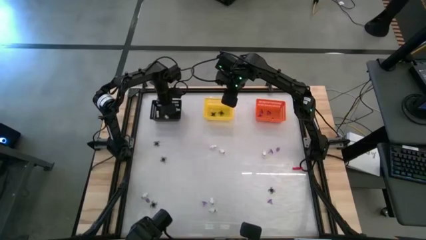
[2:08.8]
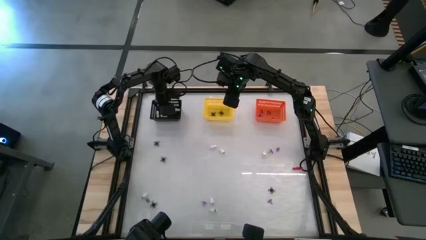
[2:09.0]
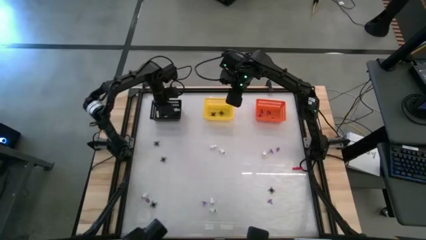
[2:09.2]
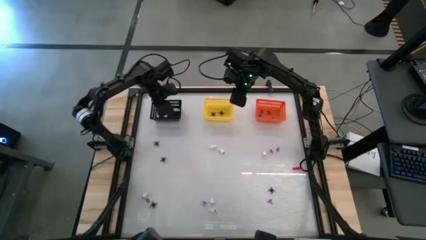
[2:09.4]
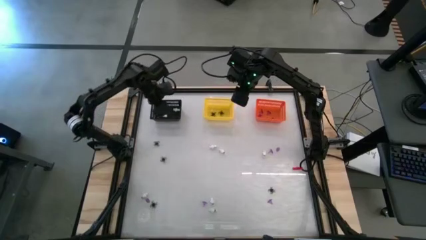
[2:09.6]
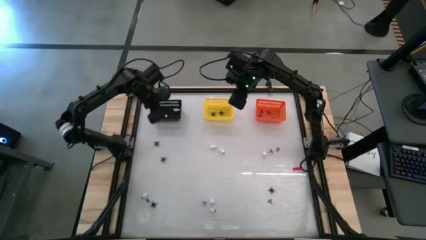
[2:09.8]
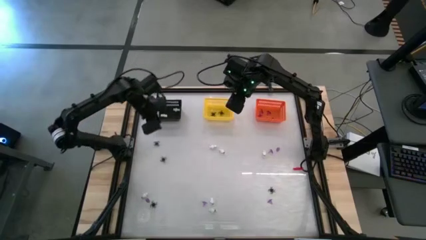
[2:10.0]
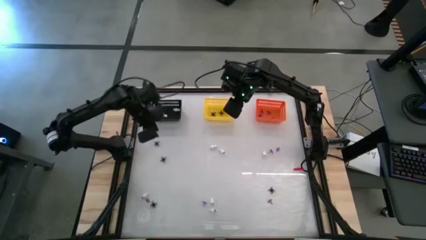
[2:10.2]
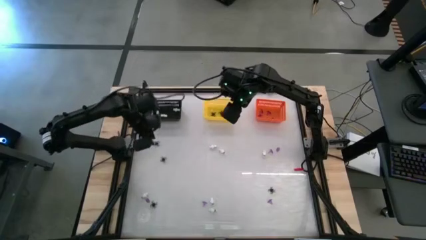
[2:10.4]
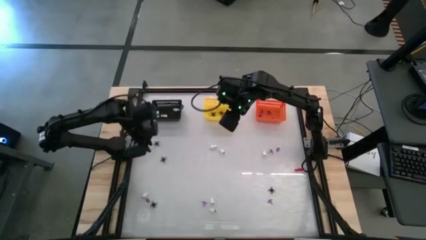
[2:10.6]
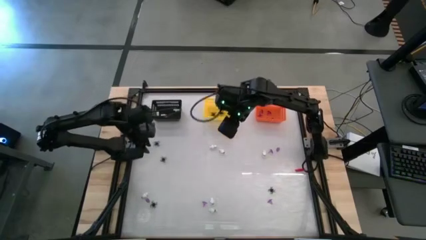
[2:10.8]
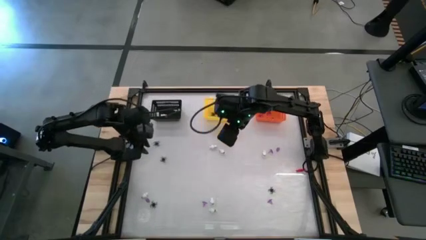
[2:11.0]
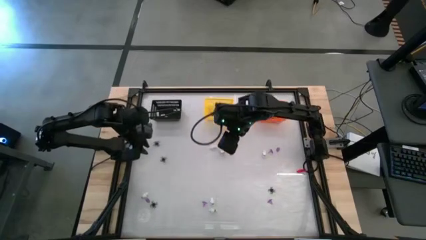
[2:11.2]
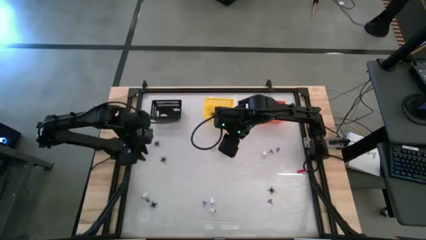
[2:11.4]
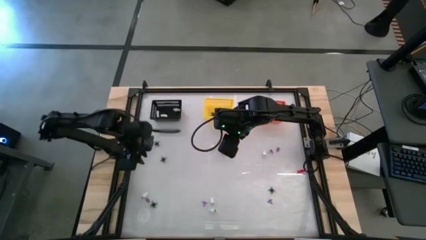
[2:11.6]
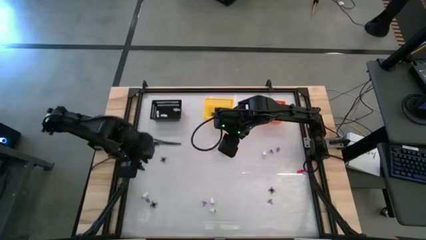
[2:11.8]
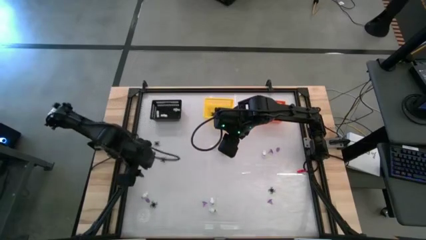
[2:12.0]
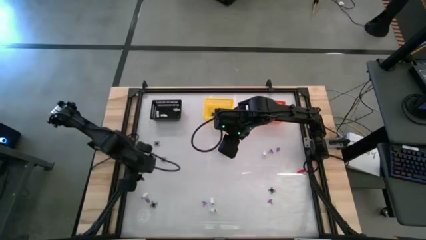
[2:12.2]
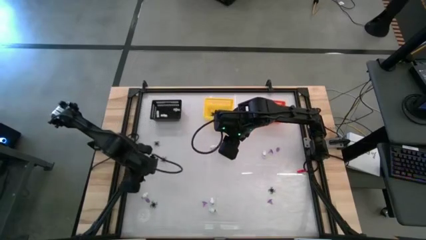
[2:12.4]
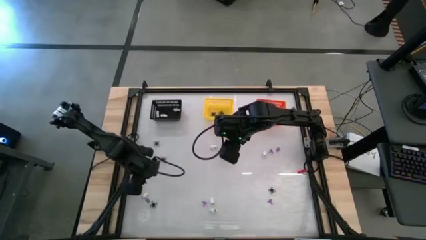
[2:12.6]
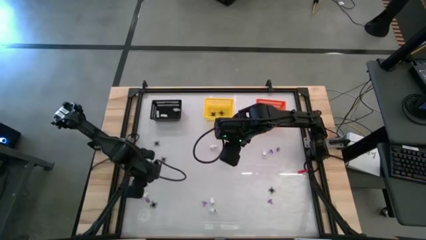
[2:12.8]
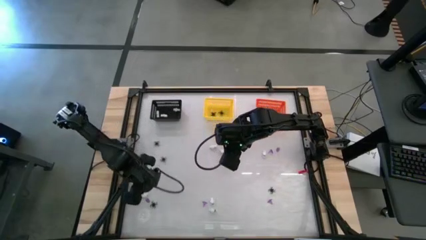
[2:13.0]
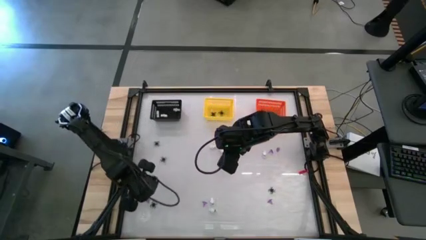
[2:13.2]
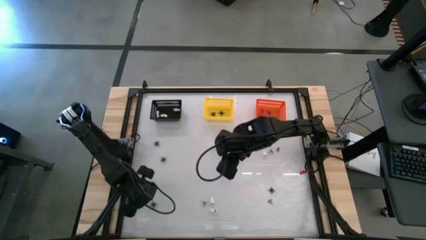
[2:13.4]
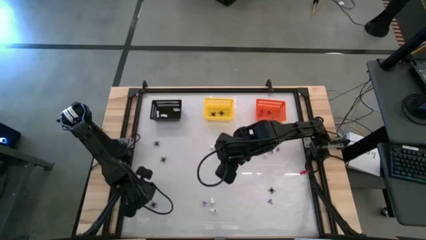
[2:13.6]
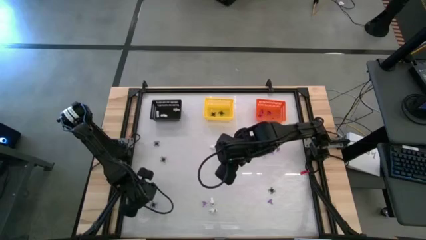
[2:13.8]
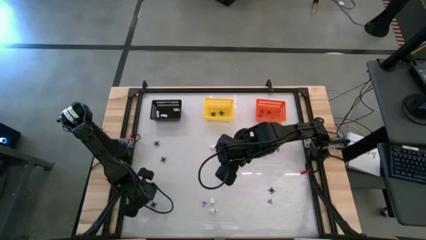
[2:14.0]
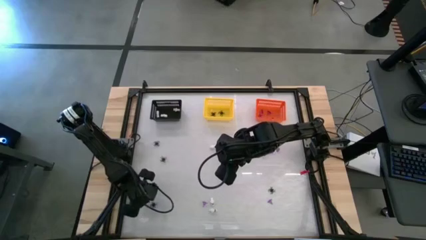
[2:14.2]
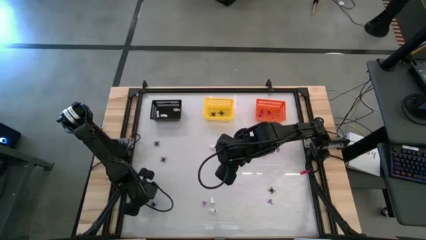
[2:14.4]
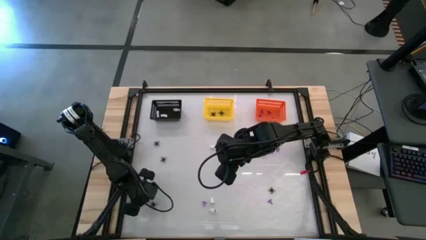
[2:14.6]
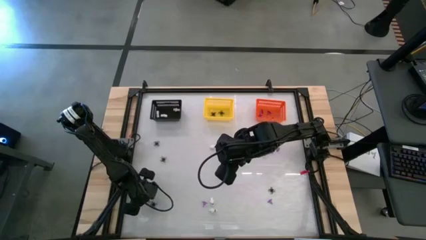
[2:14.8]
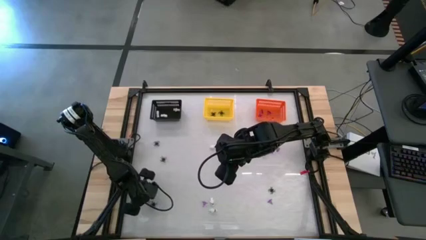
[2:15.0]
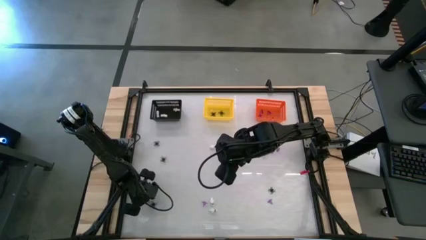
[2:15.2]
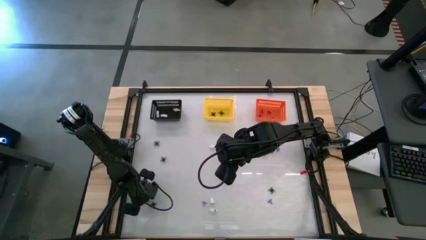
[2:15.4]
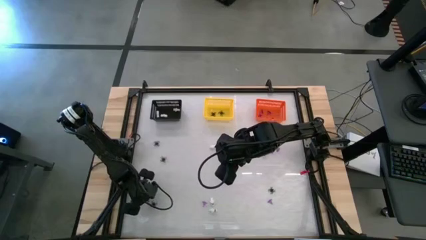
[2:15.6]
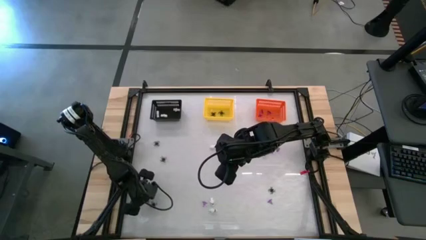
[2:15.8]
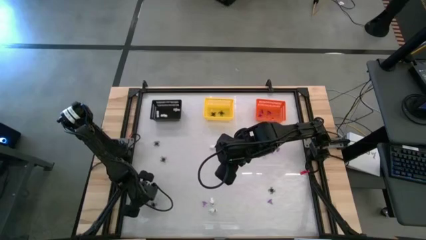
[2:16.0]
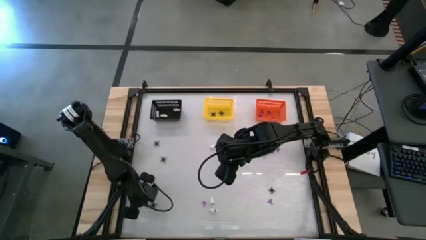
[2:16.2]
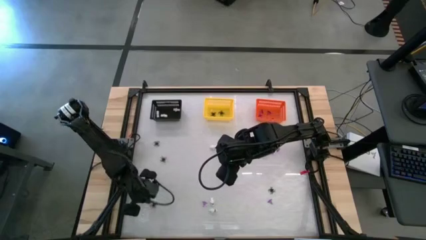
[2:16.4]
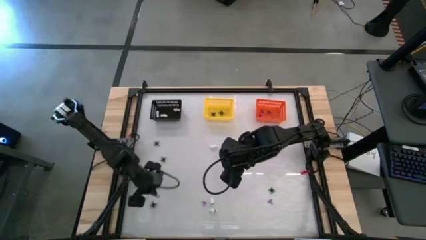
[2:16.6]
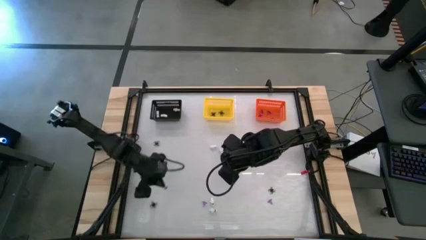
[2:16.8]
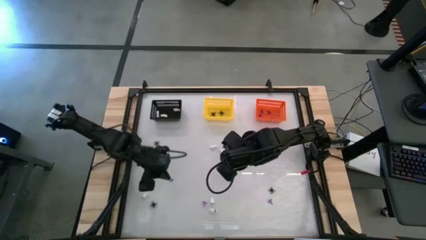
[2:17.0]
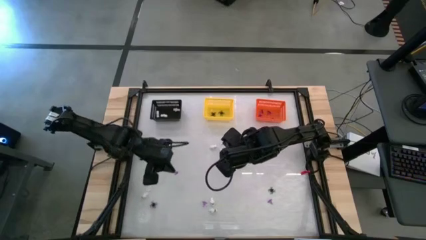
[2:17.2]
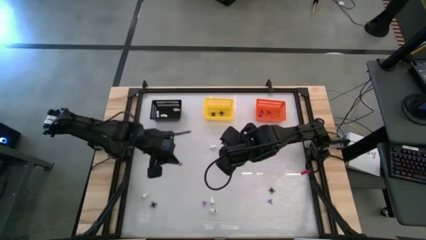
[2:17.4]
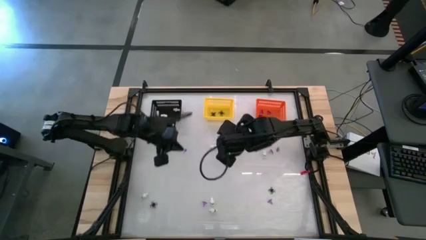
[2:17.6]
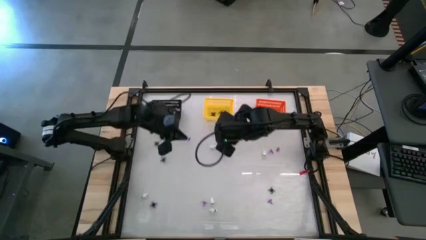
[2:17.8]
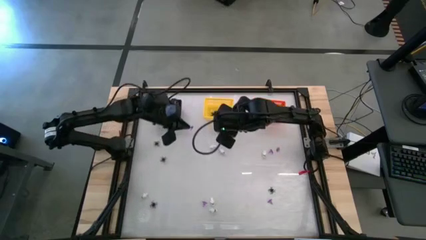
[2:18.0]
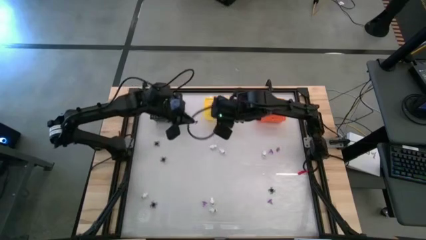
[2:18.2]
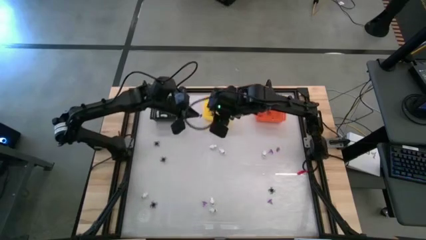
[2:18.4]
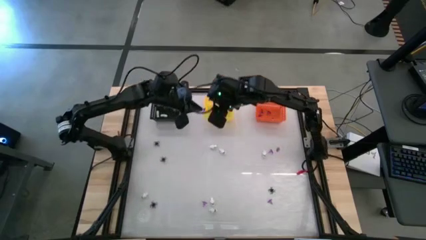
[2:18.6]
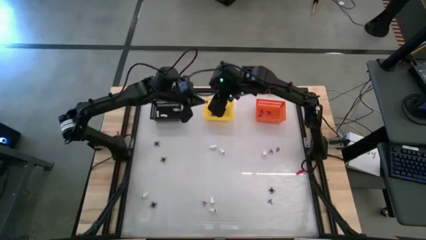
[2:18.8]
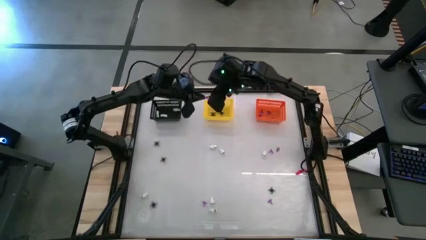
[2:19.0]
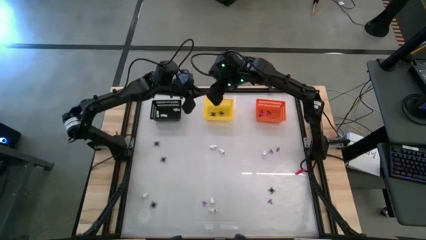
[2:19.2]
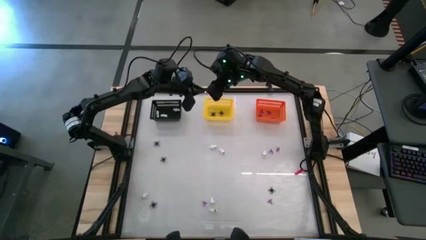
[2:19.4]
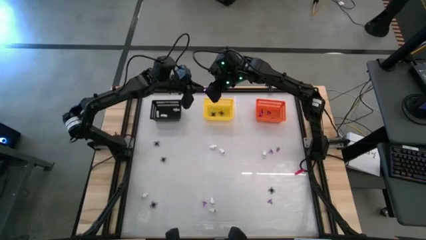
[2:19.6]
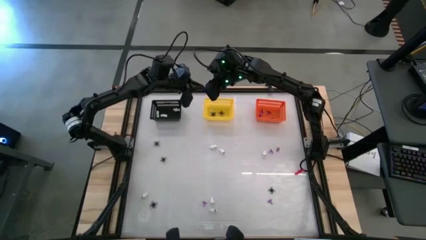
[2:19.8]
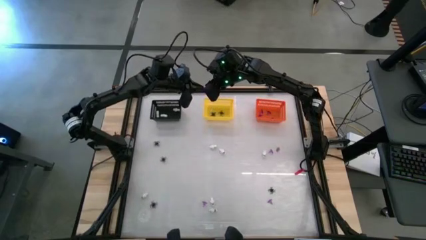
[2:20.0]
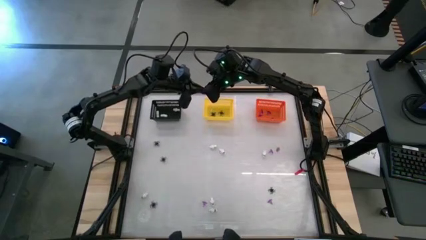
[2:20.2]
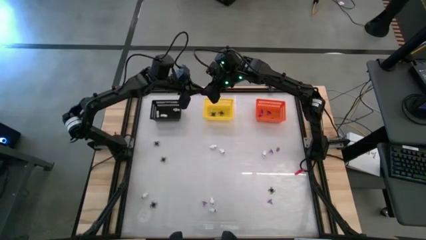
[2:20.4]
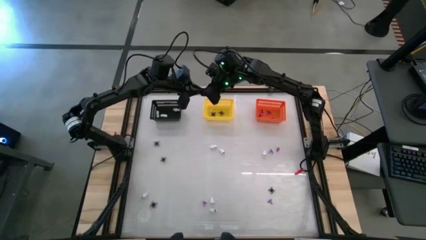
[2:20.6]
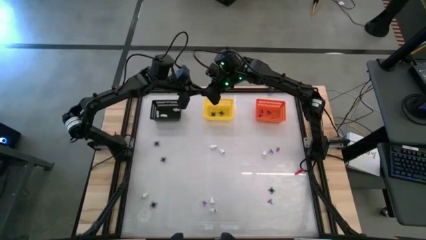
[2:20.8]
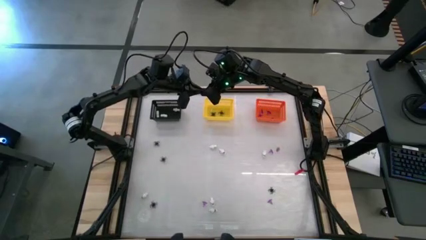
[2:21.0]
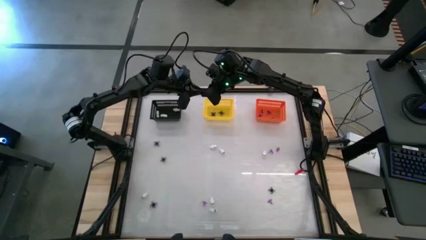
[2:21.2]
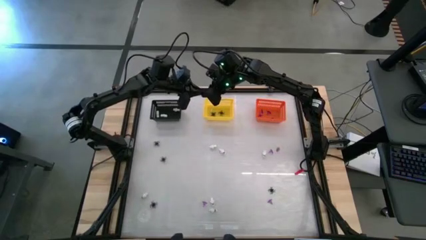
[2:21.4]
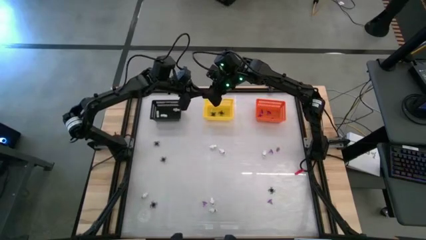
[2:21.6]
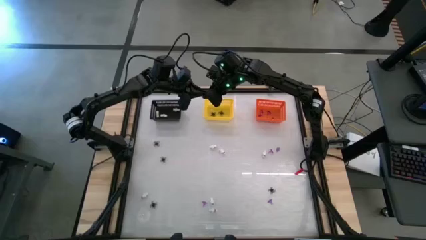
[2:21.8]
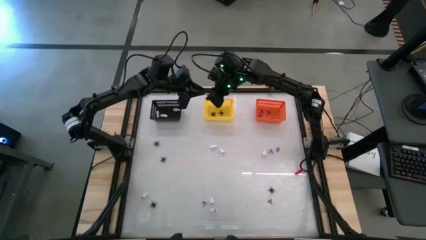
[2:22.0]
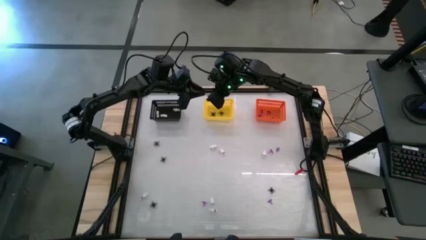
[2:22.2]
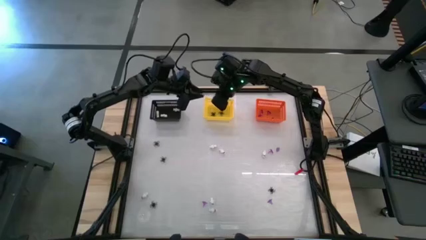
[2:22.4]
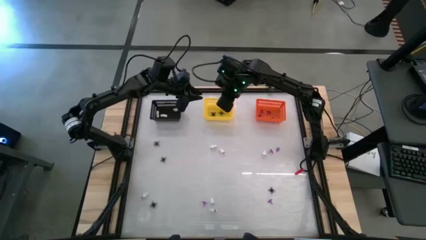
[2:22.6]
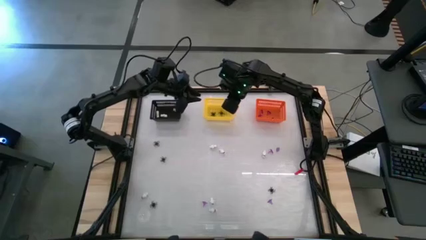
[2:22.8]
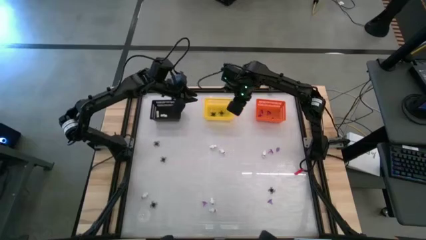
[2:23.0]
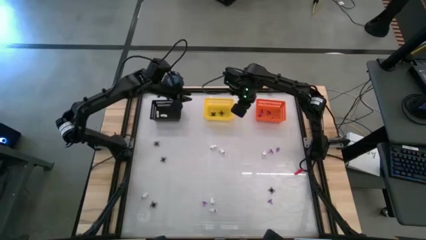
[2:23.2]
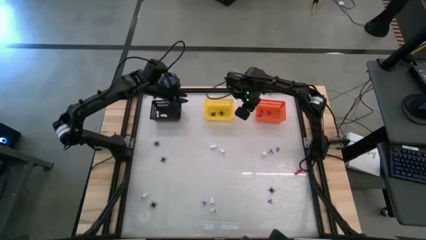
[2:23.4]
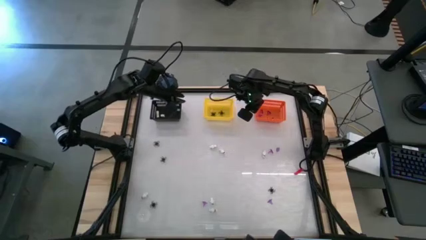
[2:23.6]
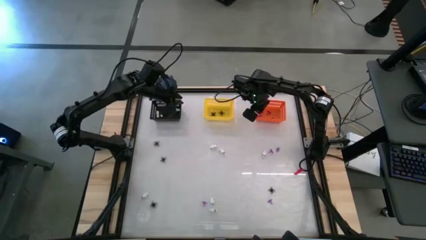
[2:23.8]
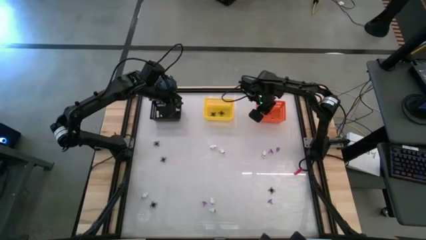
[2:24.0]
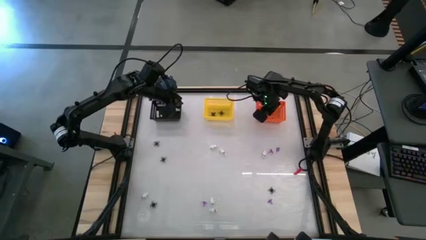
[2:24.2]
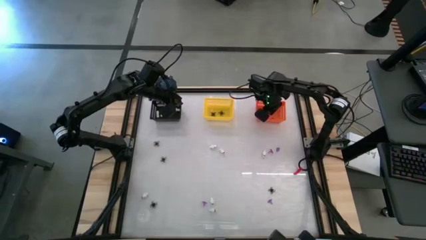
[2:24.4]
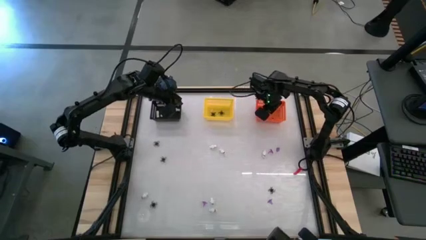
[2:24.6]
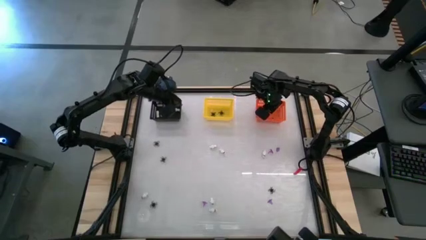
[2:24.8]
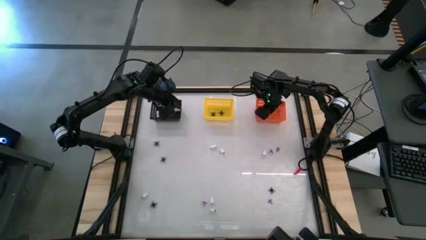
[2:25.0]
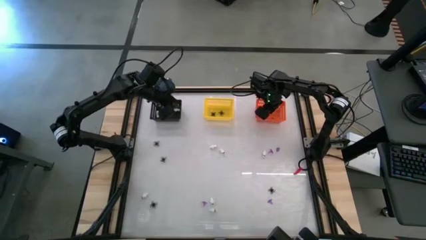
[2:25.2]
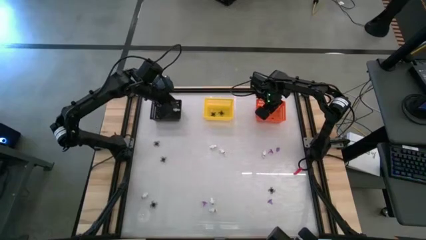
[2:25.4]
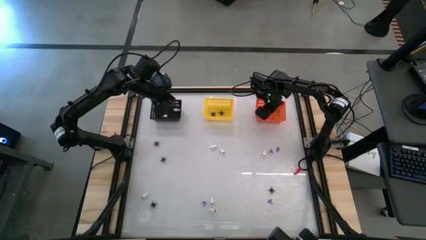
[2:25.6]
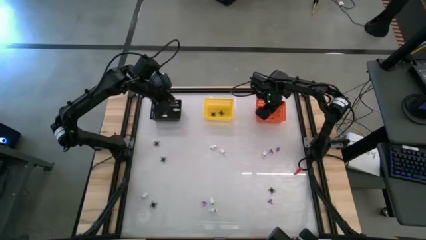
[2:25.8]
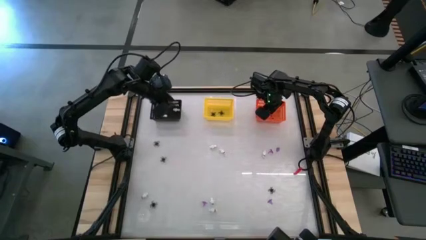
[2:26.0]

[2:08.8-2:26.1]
Task: Sort Halloween decoration
Put the purple witch hat toy into the orange basket
